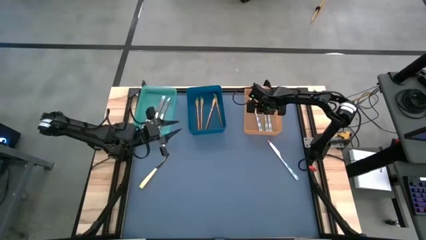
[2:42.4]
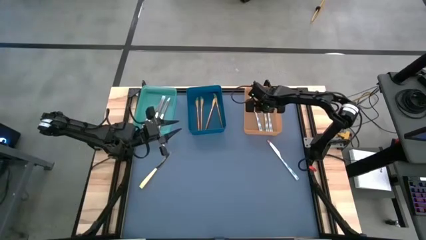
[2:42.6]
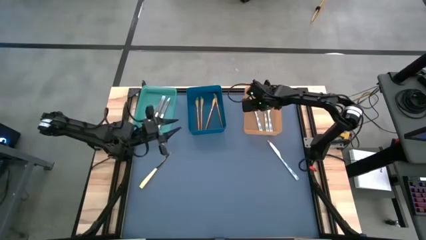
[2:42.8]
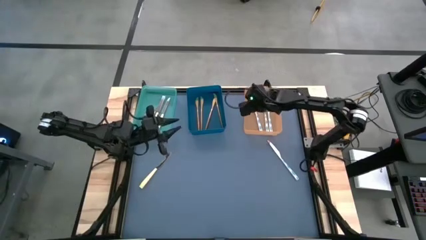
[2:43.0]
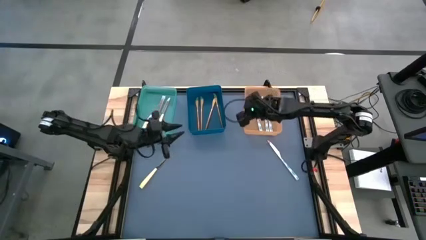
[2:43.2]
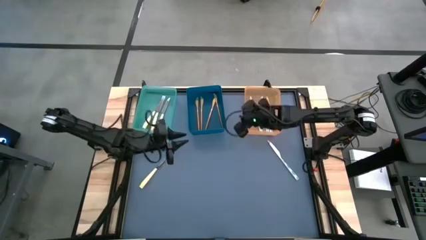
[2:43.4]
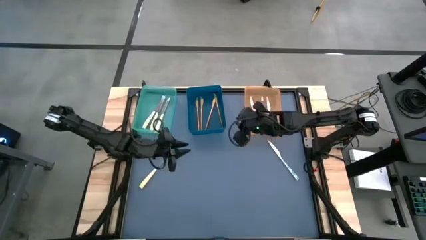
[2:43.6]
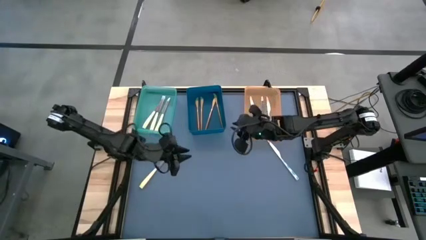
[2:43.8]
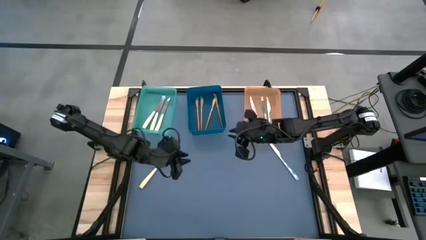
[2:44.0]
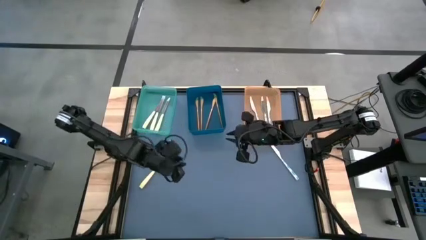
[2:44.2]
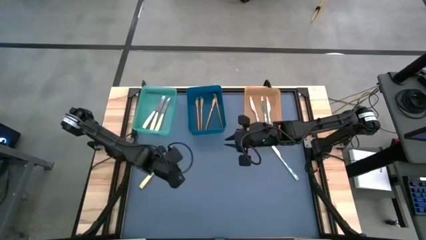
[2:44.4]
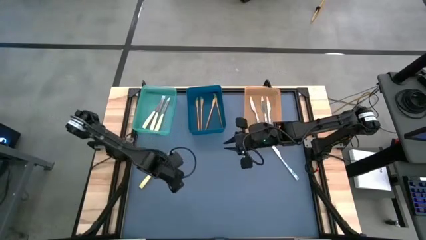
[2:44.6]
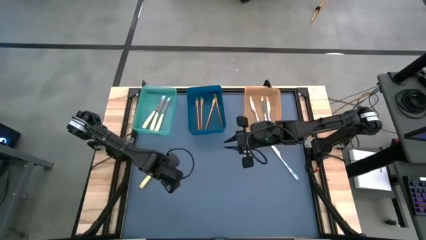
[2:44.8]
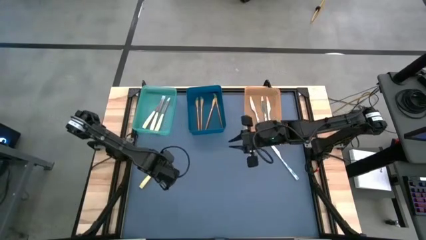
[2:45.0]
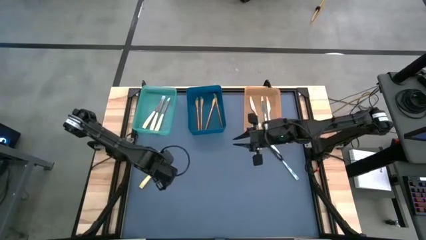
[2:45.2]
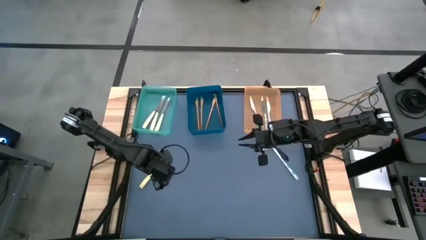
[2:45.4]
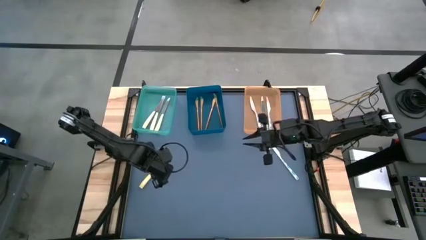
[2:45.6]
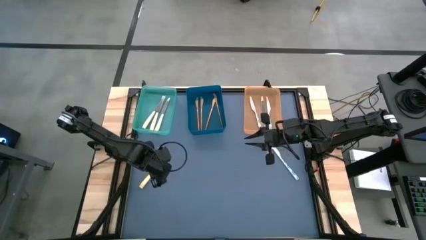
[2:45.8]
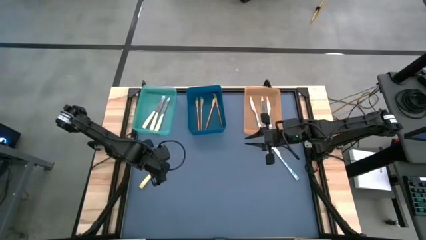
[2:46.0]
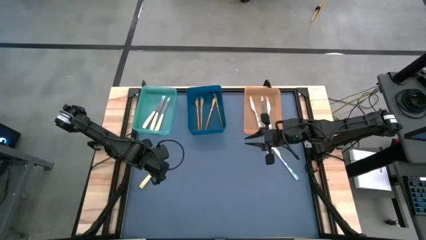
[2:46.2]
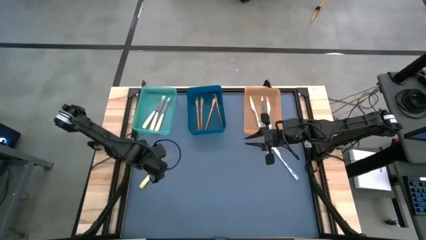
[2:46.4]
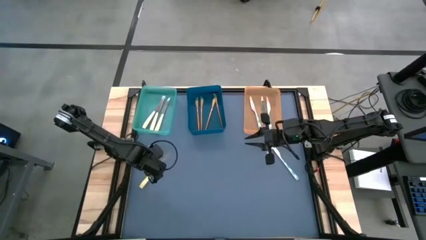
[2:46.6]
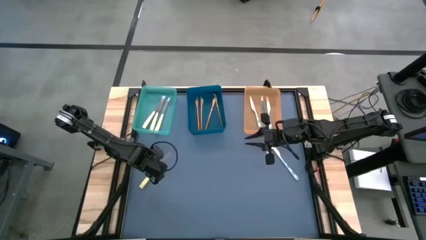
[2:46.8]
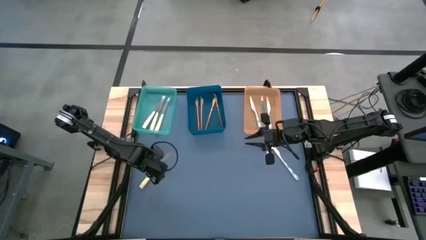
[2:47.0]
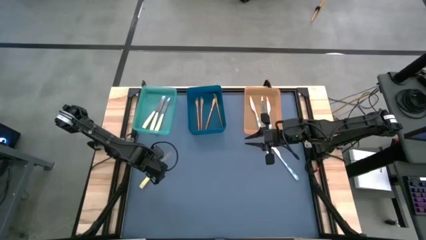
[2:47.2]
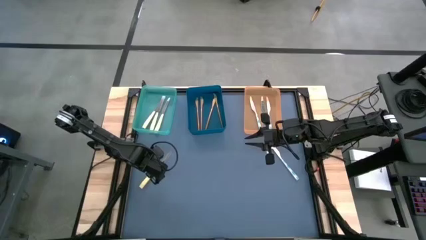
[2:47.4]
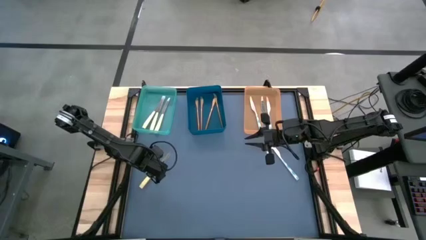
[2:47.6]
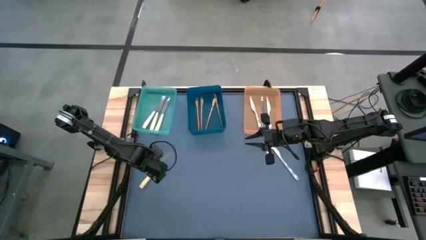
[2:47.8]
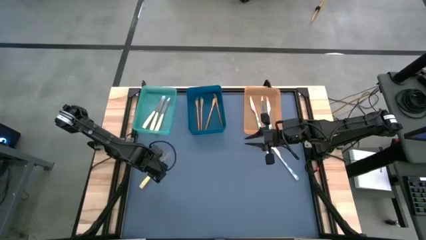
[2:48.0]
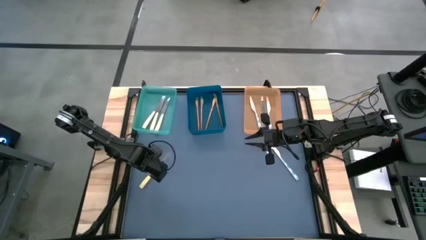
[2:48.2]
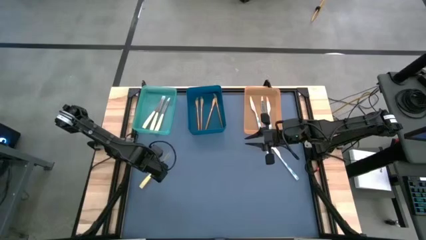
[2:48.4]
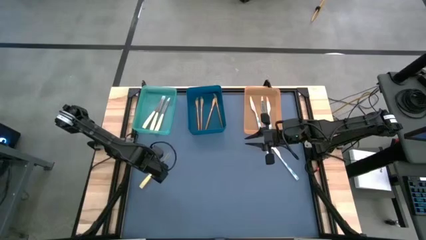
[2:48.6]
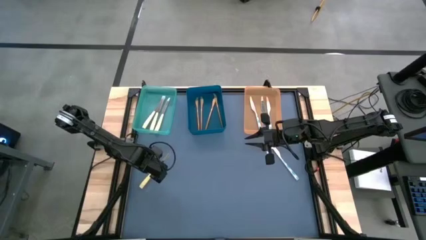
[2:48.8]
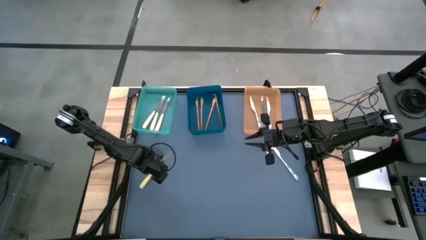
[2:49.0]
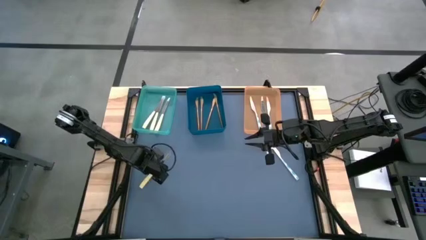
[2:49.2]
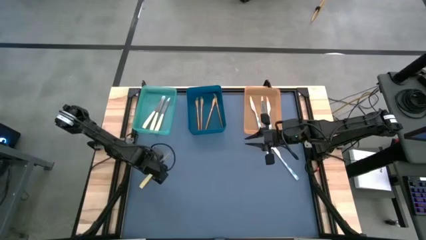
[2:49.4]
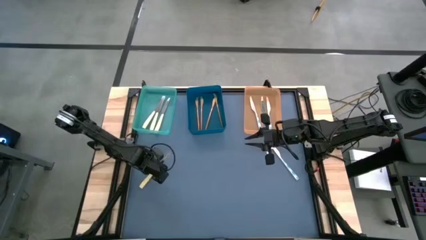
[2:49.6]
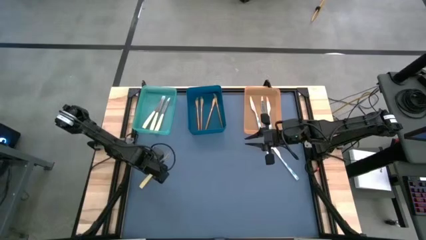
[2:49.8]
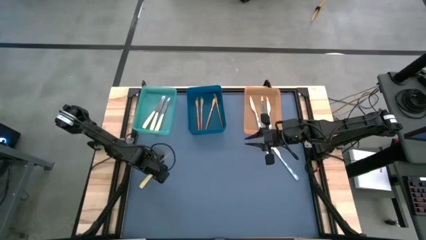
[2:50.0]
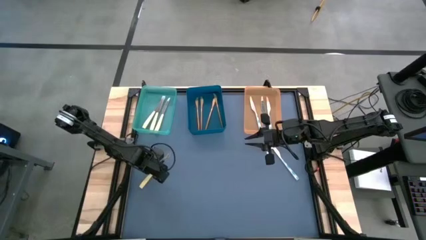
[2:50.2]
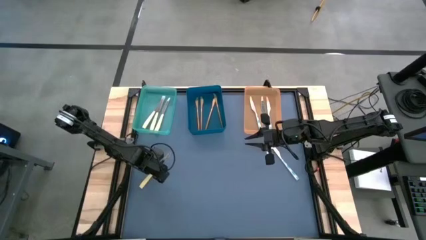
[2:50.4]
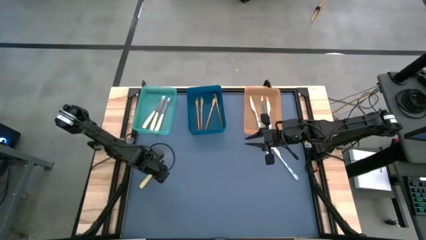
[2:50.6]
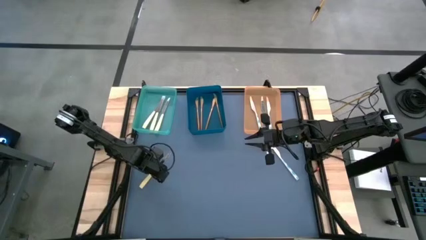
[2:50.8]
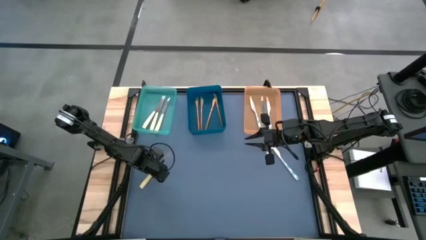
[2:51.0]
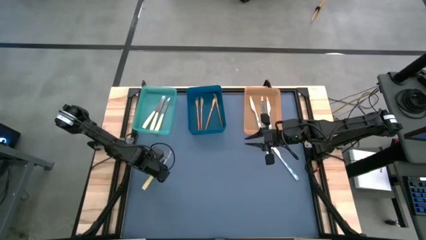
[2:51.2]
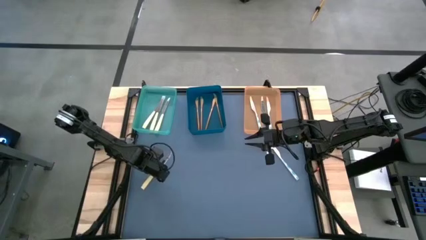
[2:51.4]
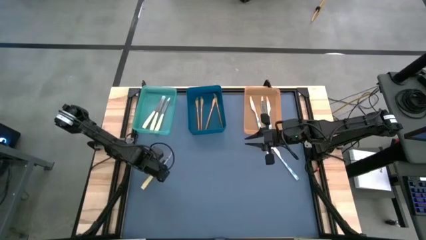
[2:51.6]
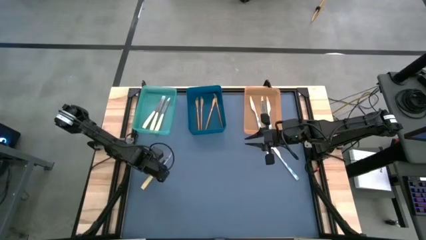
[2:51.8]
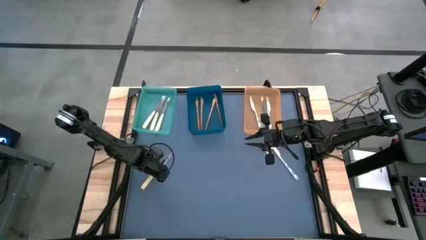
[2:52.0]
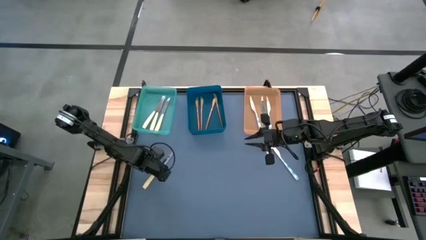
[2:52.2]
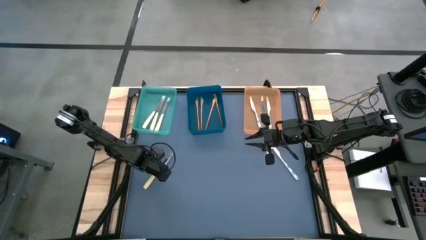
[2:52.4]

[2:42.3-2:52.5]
Task: Sort silverware by color (type)
Put the yellow knife into the green bin
